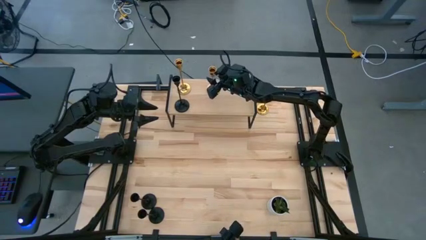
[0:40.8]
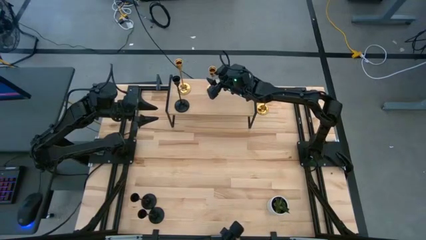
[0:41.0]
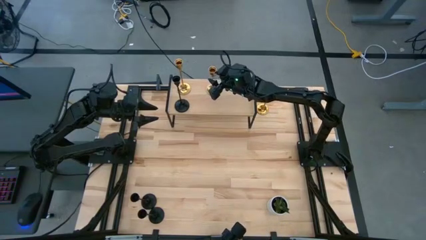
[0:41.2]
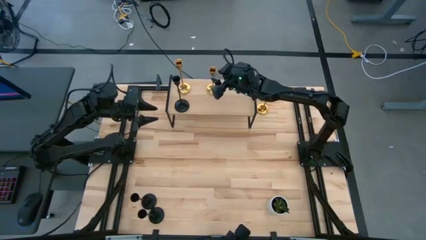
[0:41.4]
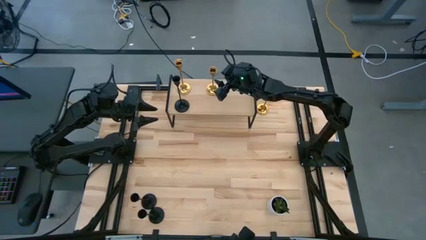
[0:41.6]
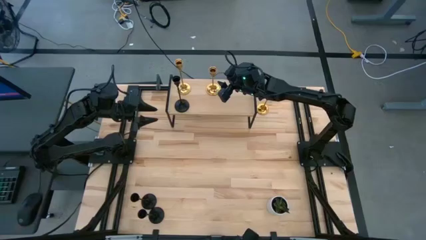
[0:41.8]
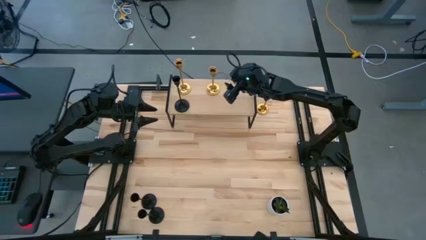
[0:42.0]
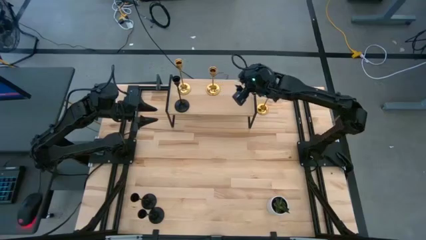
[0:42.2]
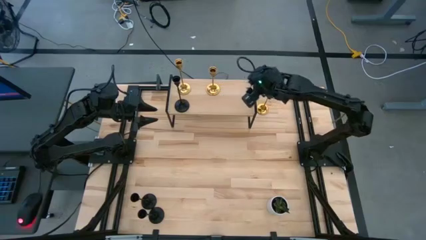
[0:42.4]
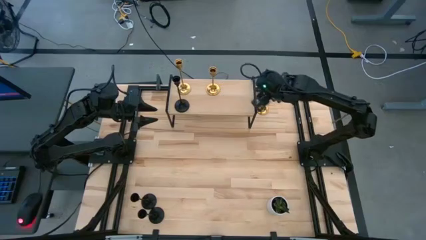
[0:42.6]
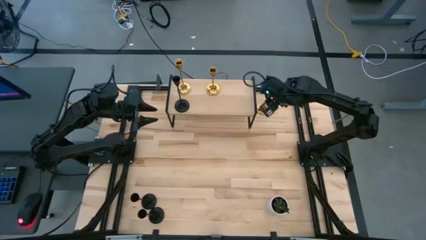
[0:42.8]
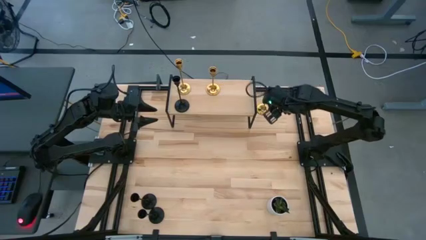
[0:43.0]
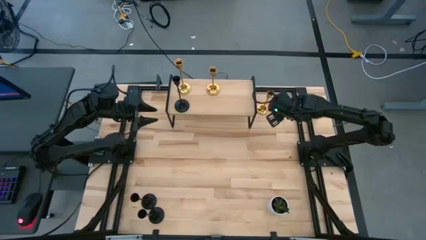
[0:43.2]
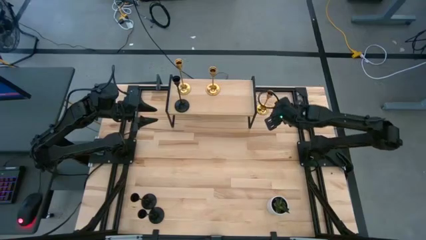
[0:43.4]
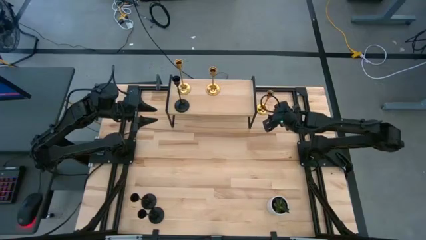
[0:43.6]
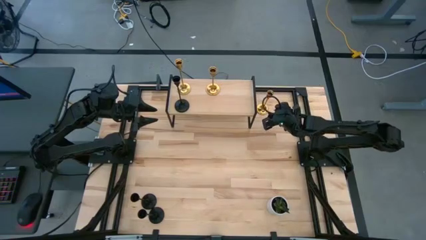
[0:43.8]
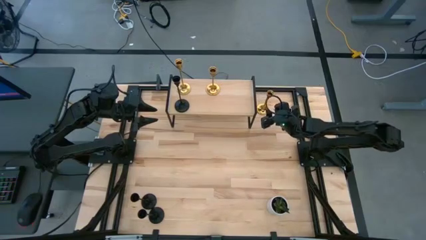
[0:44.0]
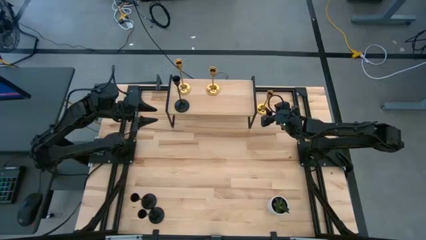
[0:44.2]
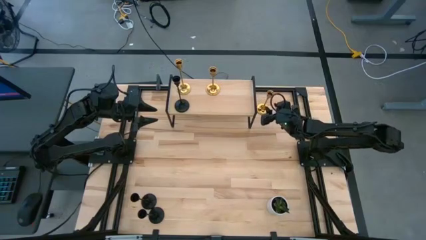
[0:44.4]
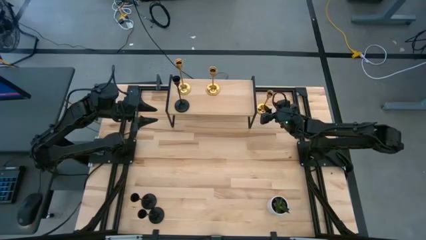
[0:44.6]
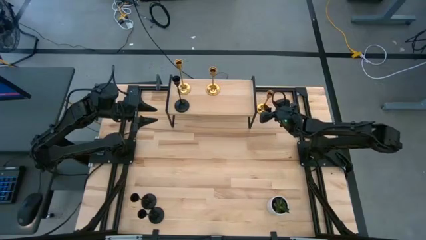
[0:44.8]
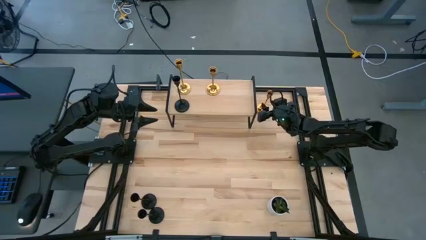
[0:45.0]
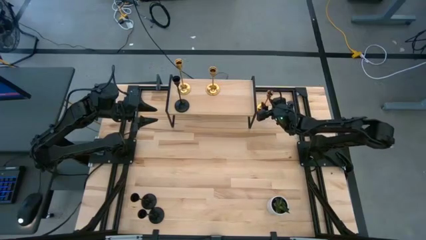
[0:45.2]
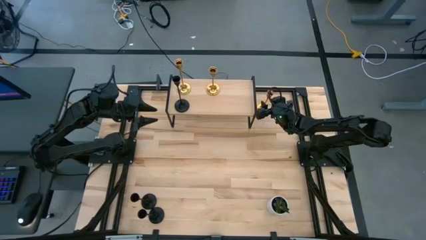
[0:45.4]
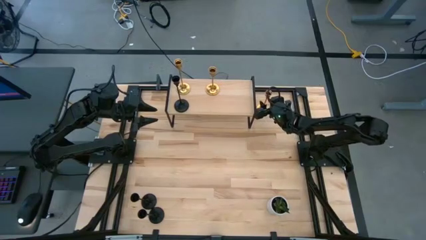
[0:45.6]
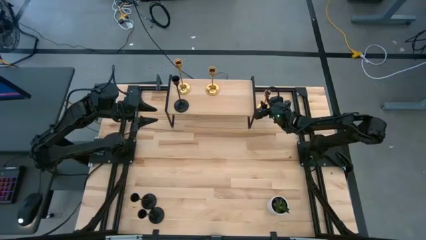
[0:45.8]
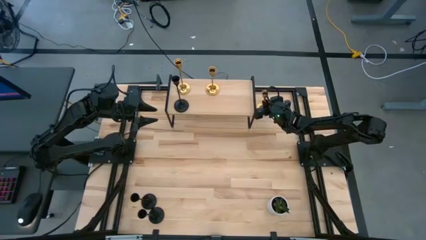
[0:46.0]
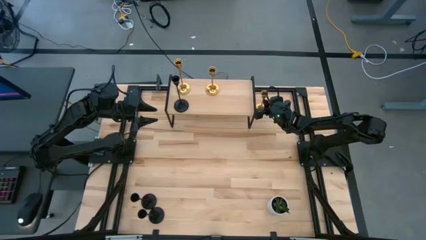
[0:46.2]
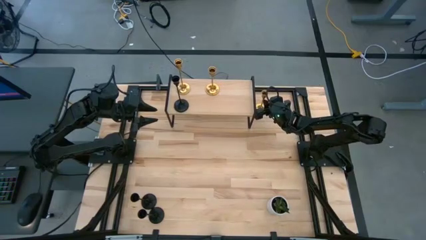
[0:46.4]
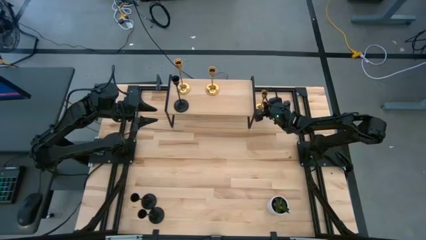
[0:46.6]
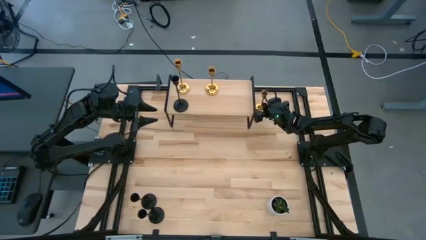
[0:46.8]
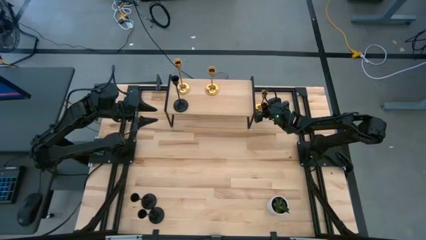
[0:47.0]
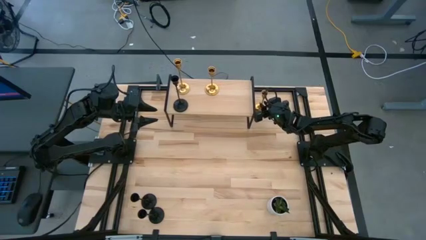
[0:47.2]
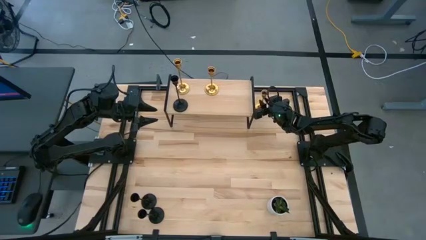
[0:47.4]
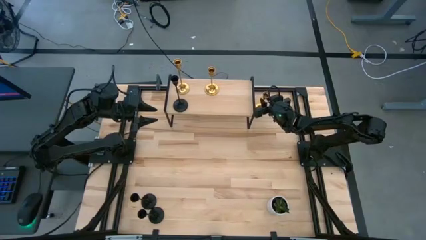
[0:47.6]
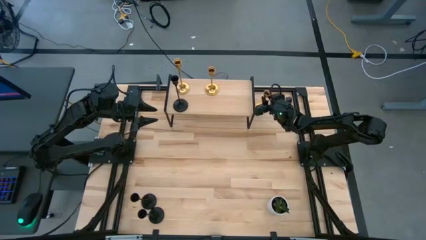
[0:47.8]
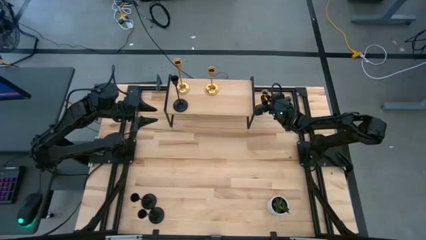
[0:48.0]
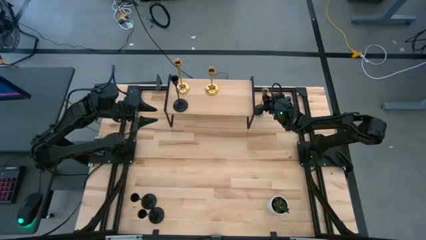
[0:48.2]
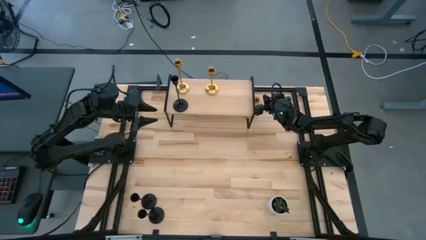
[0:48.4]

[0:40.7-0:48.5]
Task: Pick & Place candle stick holders
Put the gold candle holder aligned with the other gold candle holders on the shelf

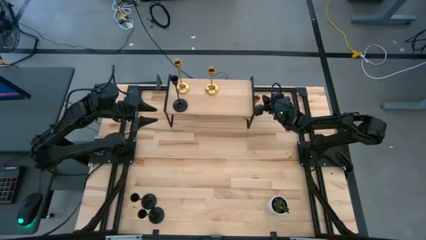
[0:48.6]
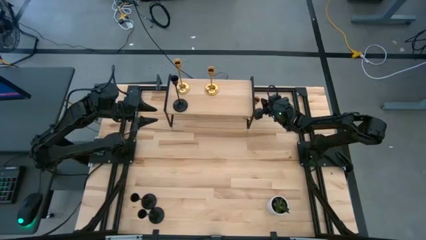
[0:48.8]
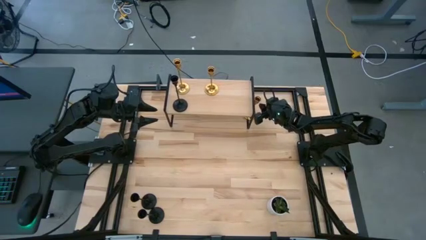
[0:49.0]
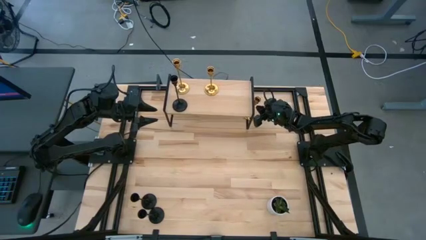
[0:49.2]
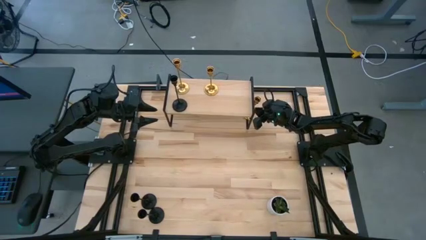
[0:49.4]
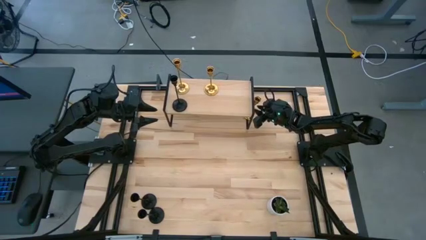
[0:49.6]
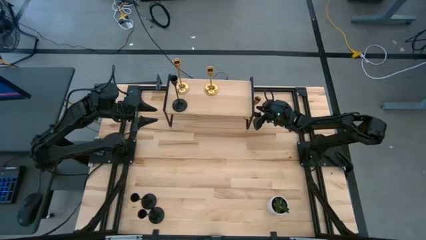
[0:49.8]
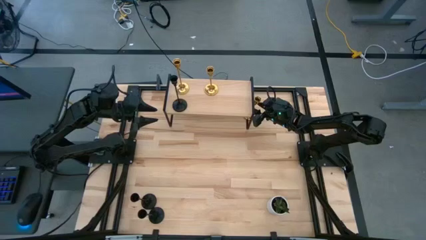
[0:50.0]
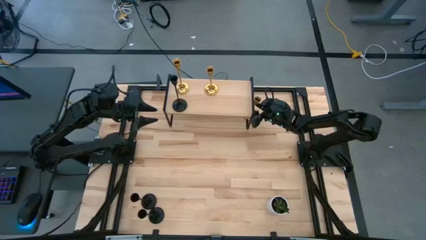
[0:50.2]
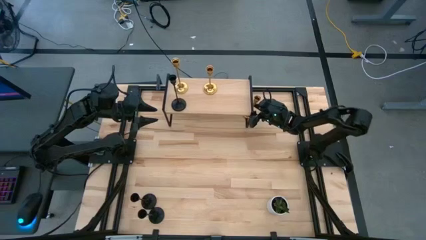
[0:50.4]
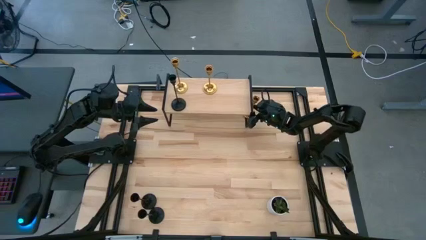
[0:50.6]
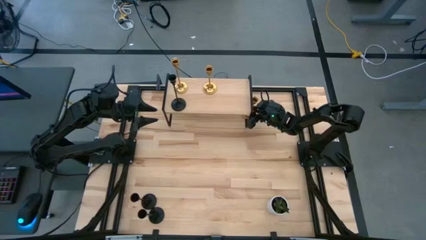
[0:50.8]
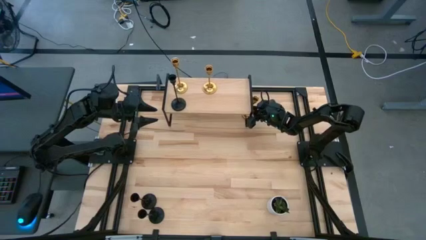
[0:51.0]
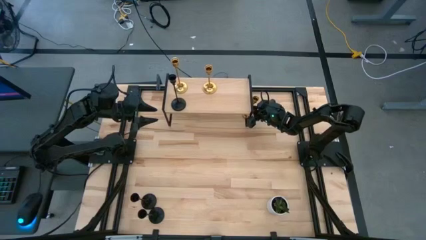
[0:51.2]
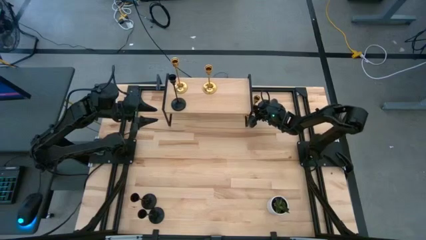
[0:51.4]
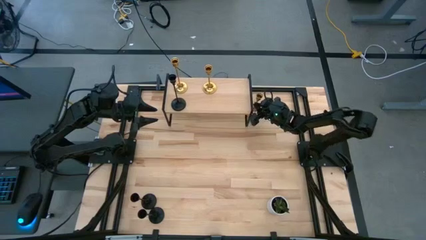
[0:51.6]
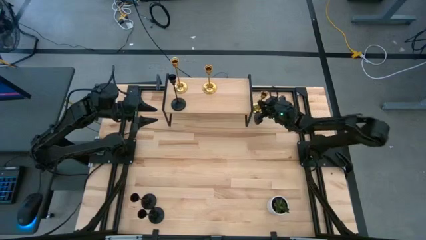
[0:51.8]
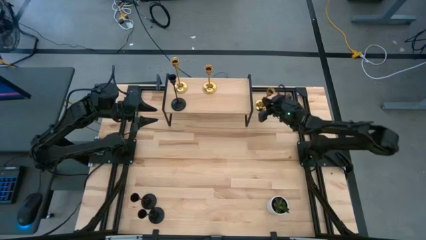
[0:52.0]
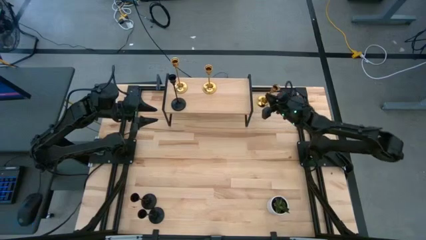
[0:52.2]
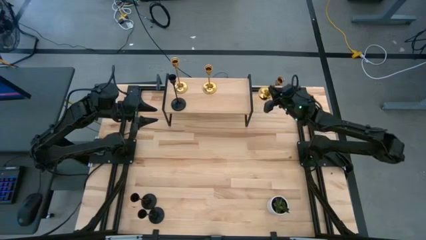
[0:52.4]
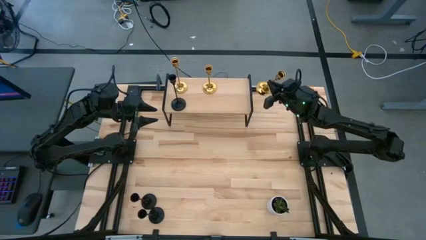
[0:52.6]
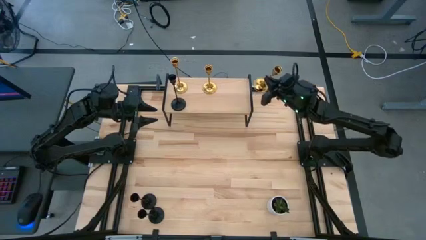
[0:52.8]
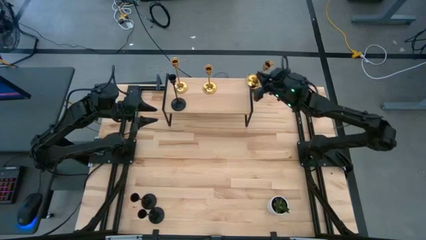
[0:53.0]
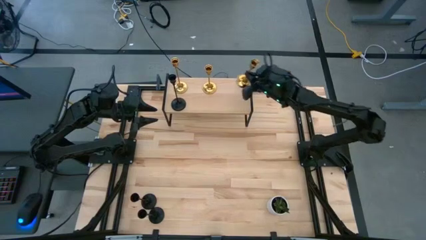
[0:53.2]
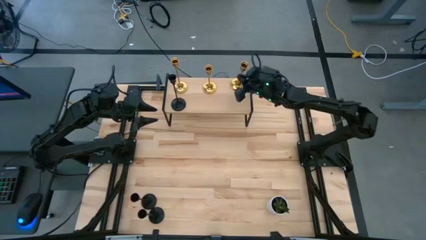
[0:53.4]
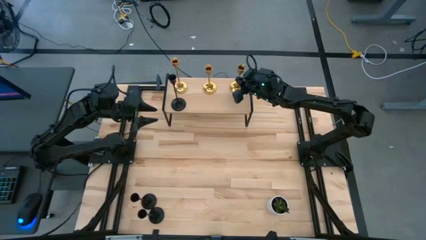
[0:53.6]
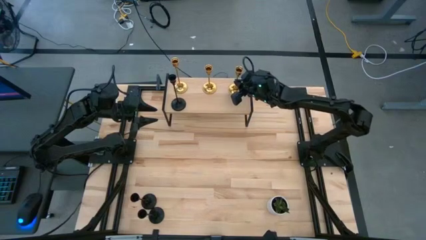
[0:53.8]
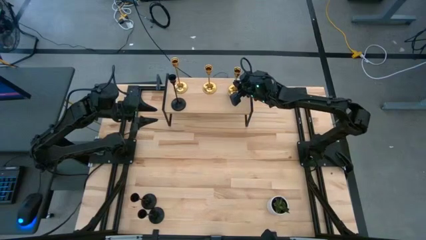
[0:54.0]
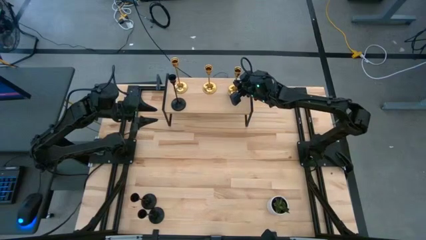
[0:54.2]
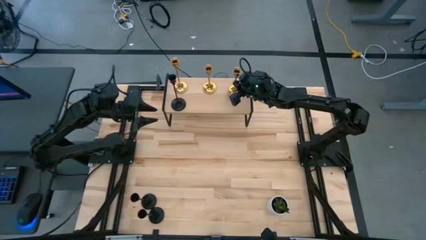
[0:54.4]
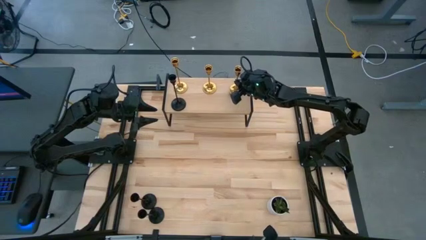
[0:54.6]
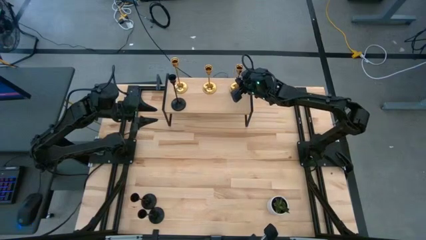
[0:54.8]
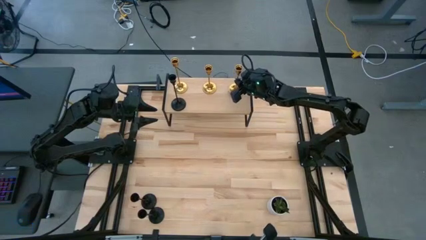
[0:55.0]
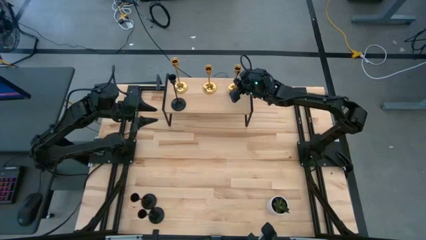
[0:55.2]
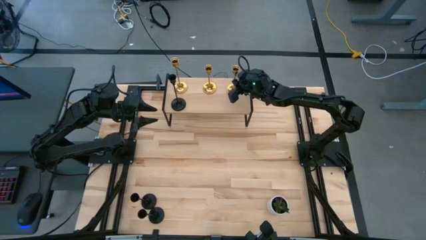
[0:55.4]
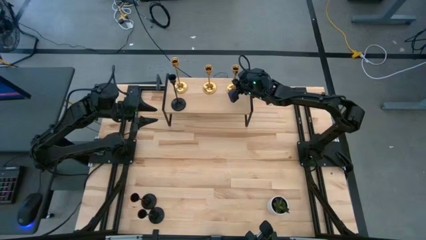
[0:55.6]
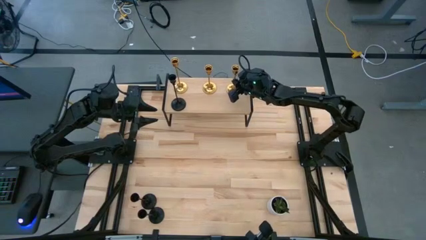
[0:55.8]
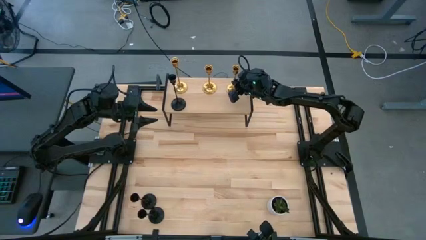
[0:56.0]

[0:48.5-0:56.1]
Put the gold candle holder aligned with the other gold candle holders on the shelf
